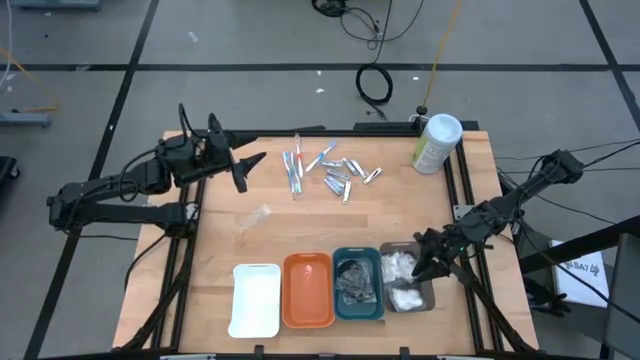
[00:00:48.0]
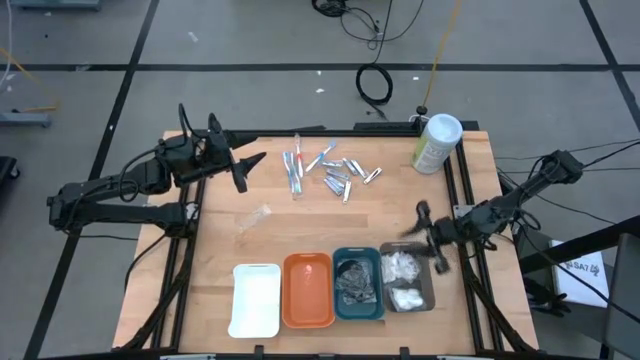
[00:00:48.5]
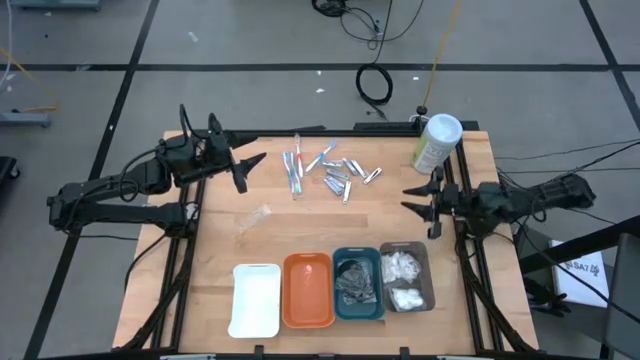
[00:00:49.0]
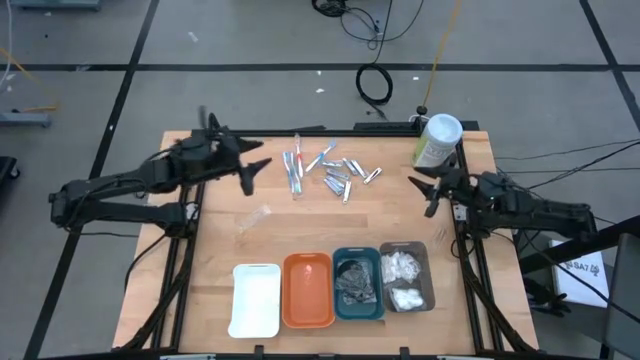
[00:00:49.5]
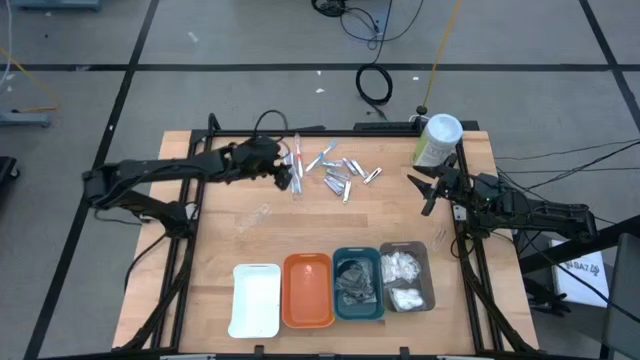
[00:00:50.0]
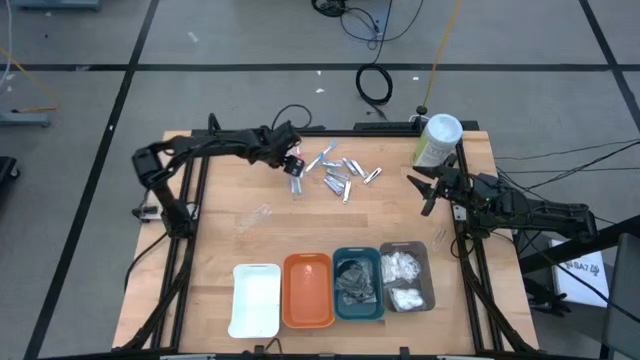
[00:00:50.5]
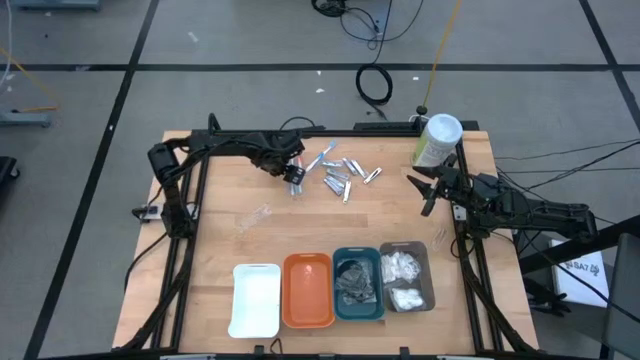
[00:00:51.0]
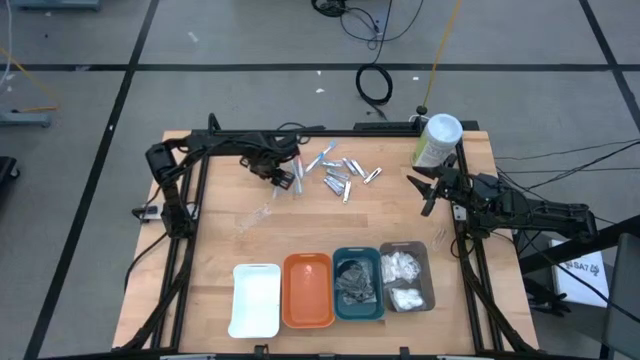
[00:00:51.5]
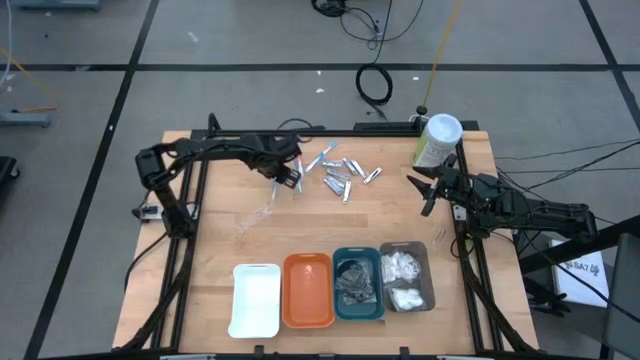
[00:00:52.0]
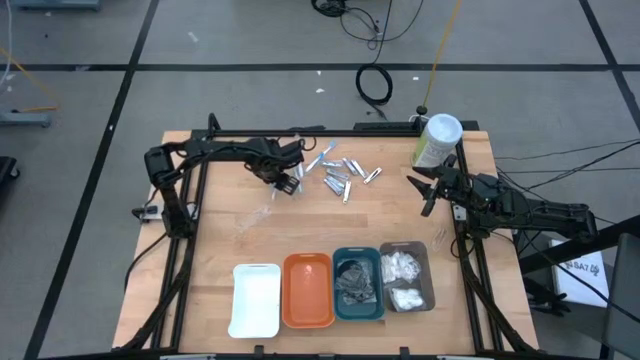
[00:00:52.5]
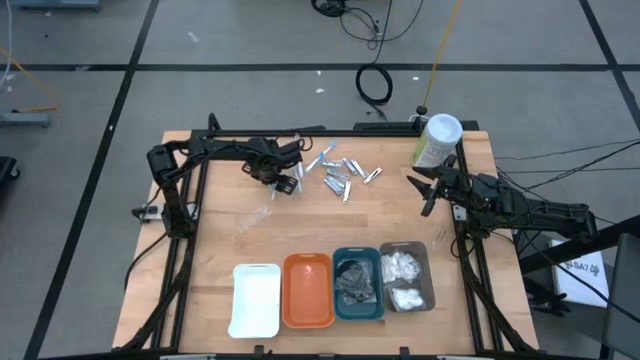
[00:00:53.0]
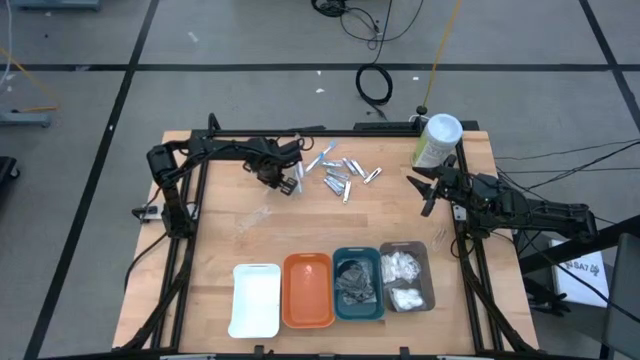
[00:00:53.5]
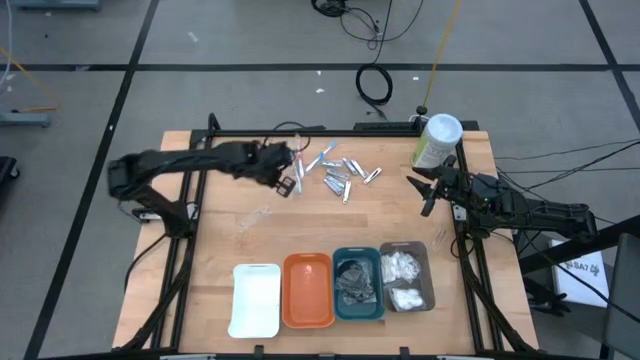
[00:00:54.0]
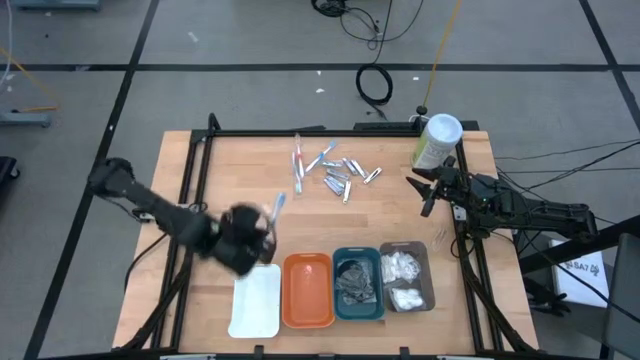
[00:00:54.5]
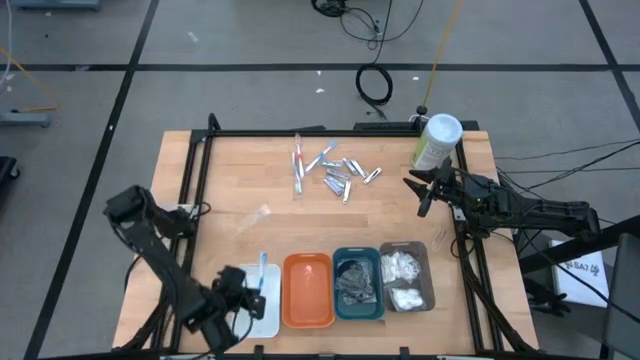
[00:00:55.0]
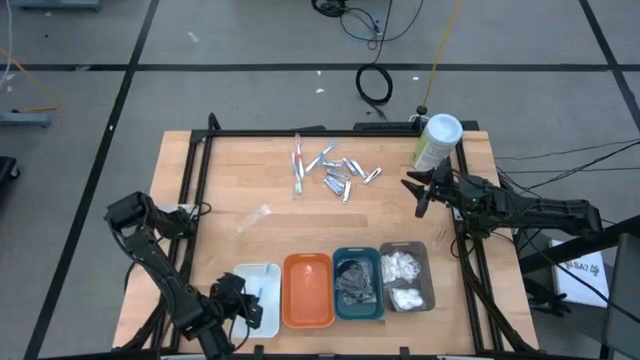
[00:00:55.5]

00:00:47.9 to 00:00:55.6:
Task: Pick & Place Travel size toiletries
Put the blue toothbrush into the white bin

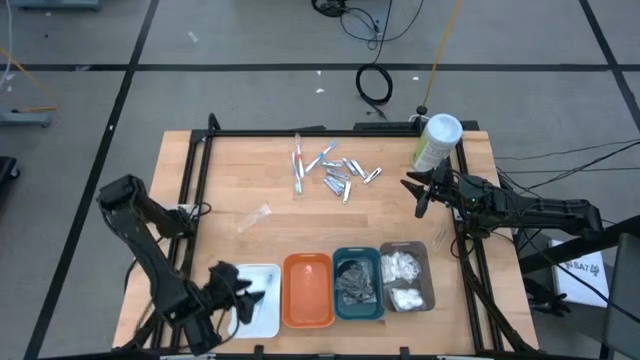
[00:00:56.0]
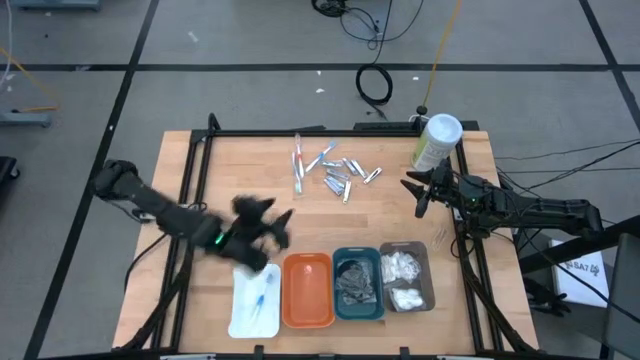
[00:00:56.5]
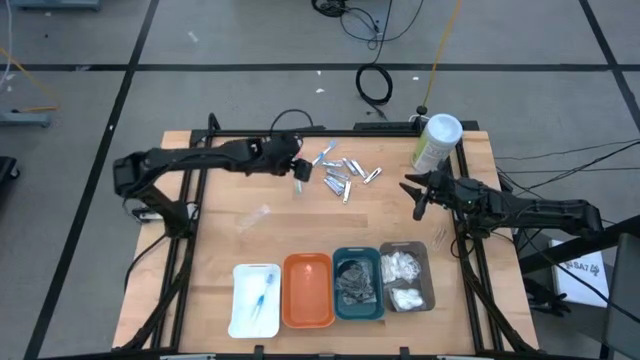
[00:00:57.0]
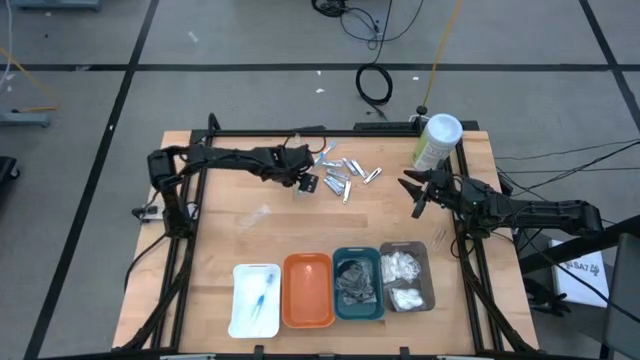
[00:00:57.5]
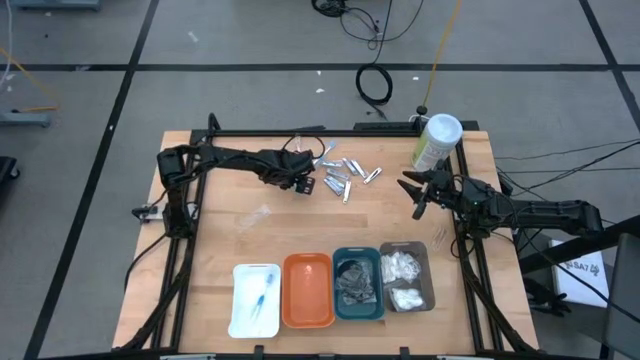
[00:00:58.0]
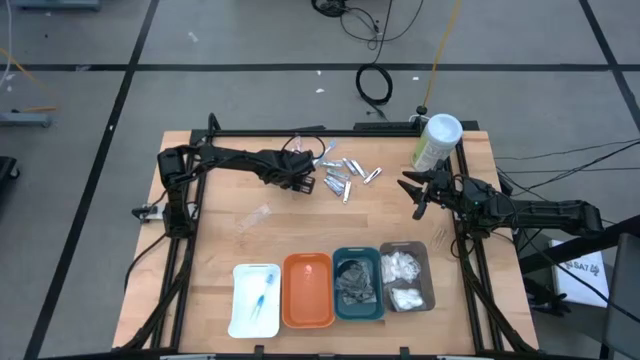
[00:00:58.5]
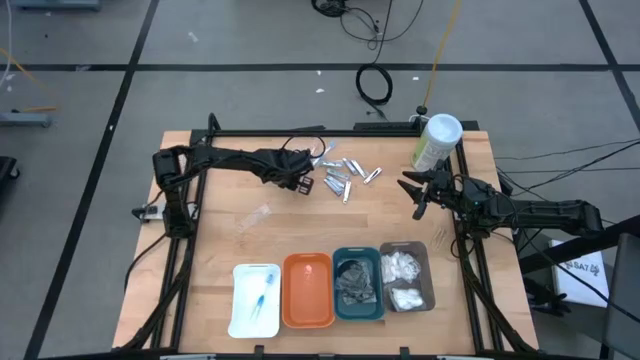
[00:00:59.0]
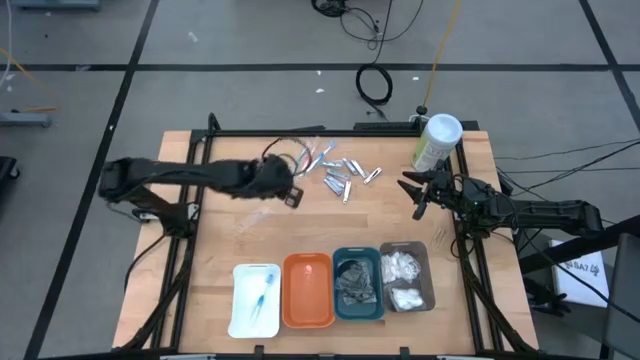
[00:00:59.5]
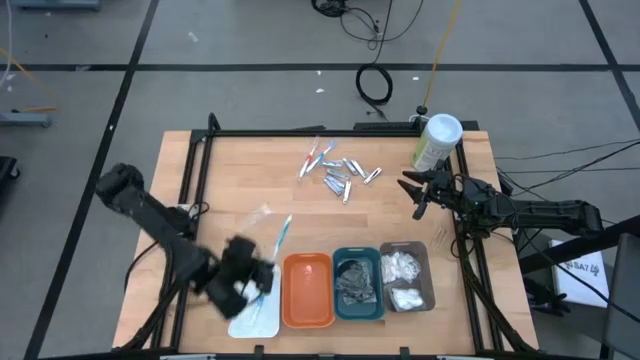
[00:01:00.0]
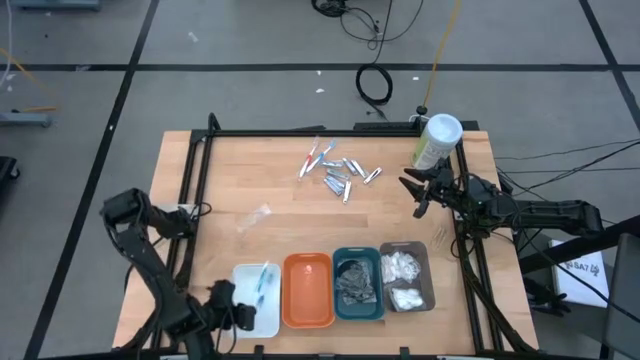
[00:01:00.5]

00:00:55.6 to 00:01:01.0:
Put the green toothbrush into the white bin

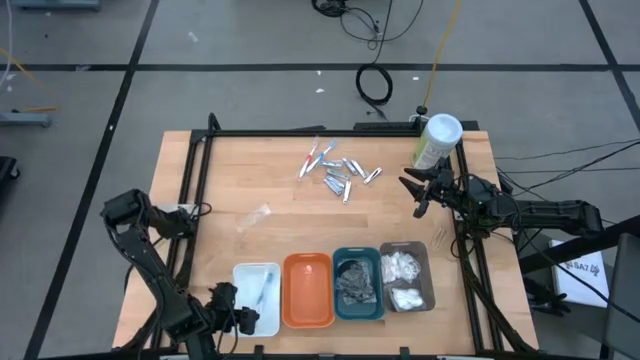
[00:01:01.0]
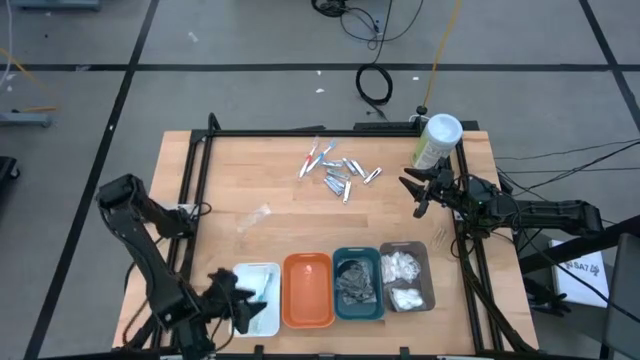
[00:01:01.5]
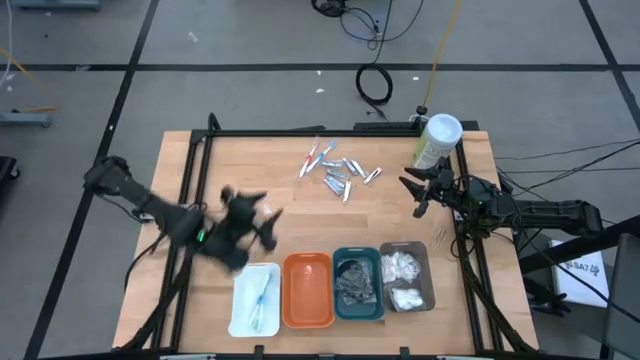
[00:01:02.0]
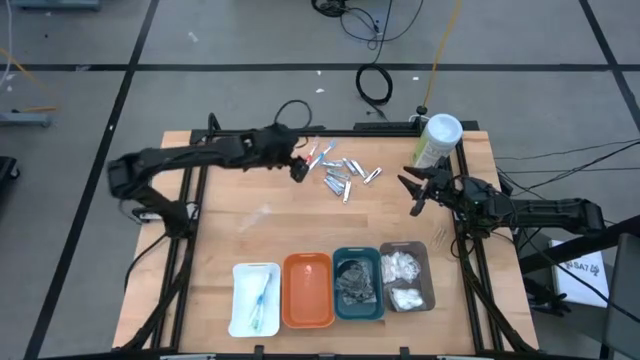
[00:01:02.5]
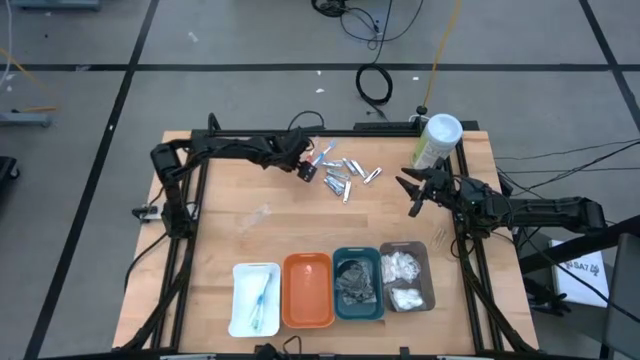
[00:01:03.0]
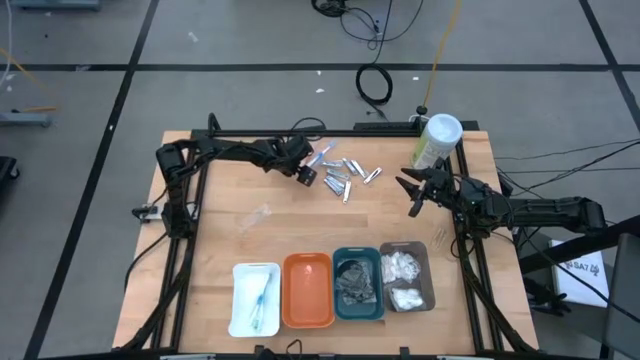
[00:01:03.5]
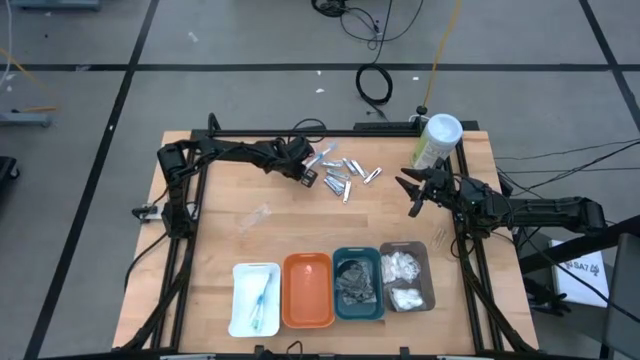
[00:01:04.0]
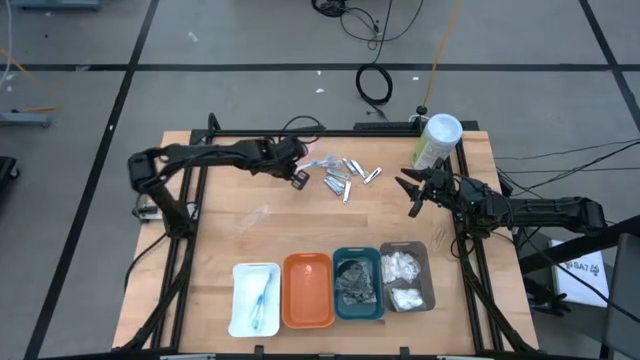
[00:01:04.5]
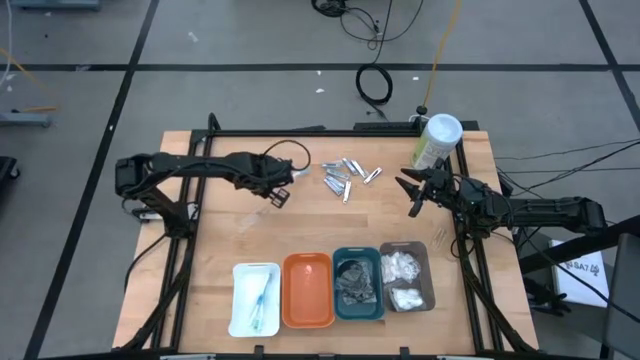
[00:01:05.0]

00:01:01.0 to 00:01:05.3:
Put the orange toothbrush into the white bin

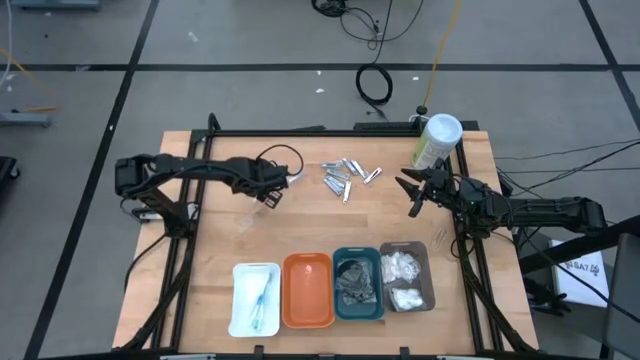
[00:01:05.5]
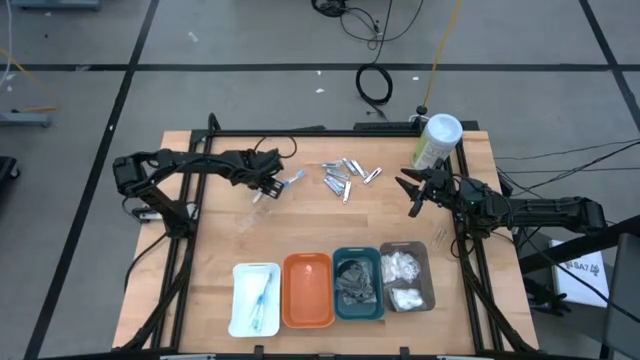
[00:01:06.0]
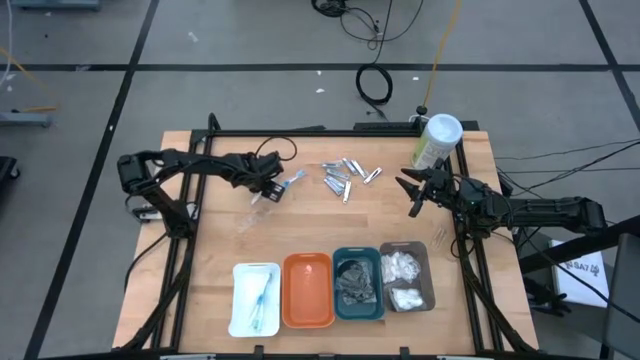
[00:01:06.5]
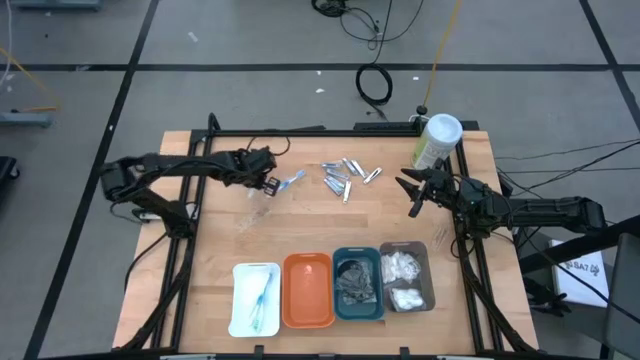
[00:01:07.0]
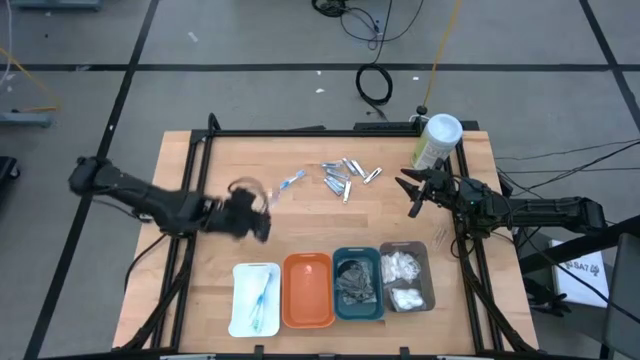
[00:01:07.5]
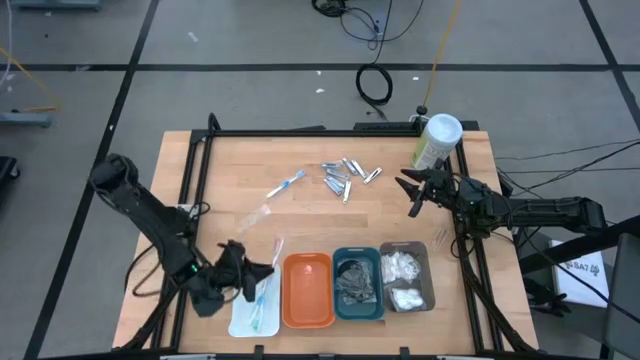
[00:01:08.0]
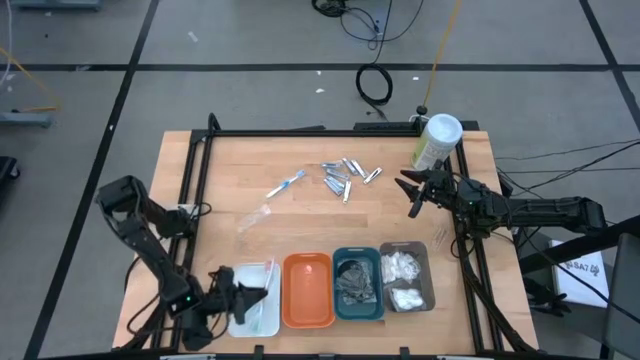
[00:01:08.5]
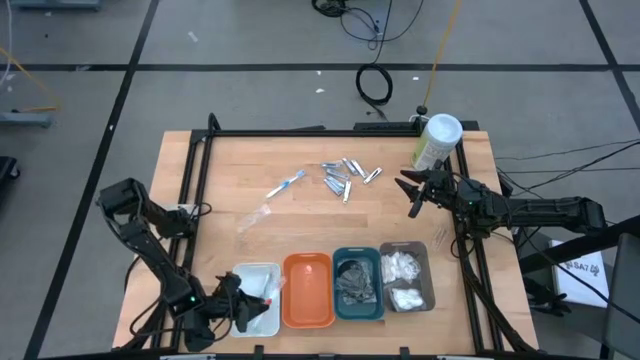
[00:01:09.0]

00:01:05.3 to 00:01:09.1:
Put the orange toothbrush into the white bin
